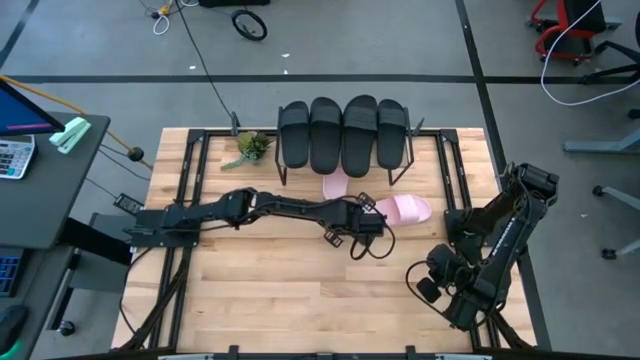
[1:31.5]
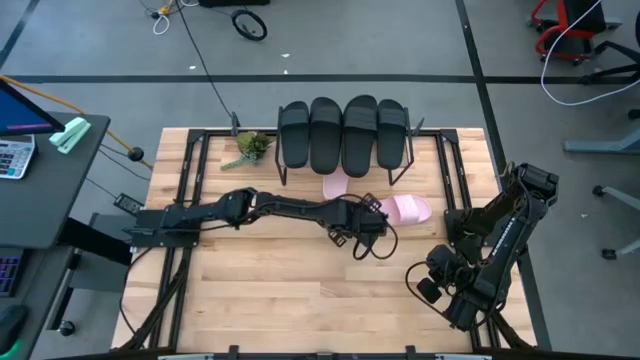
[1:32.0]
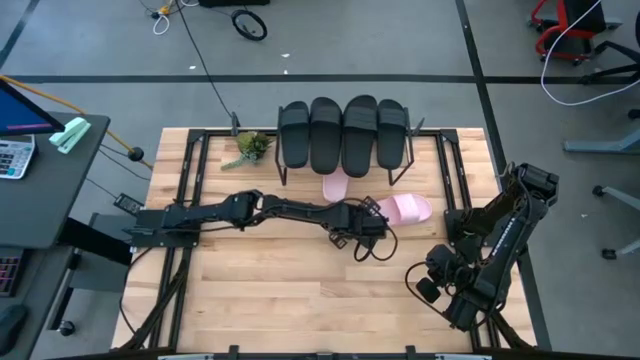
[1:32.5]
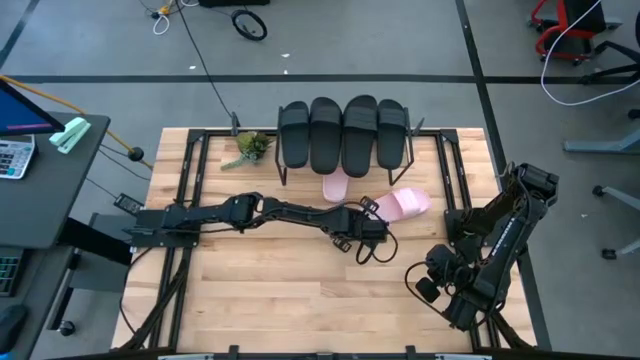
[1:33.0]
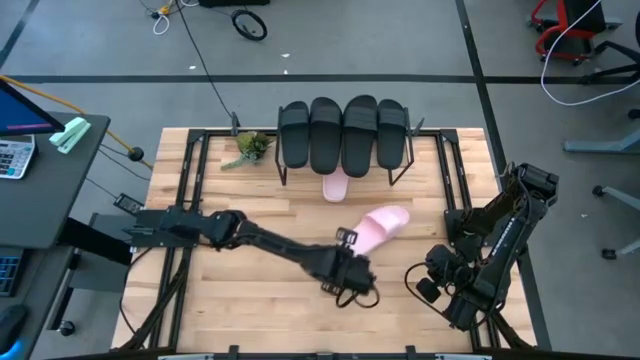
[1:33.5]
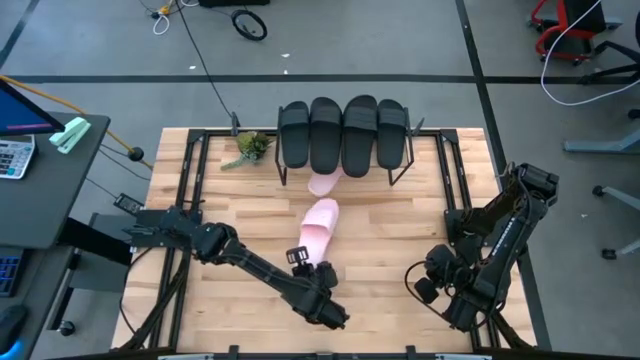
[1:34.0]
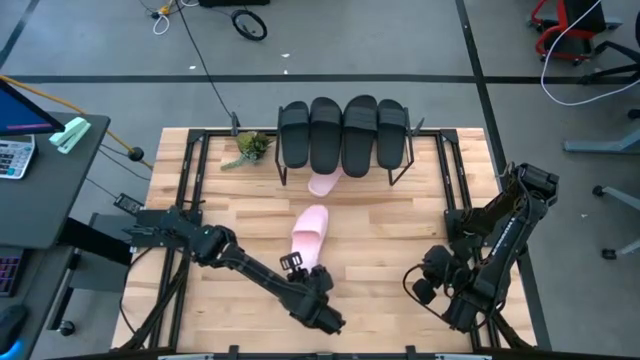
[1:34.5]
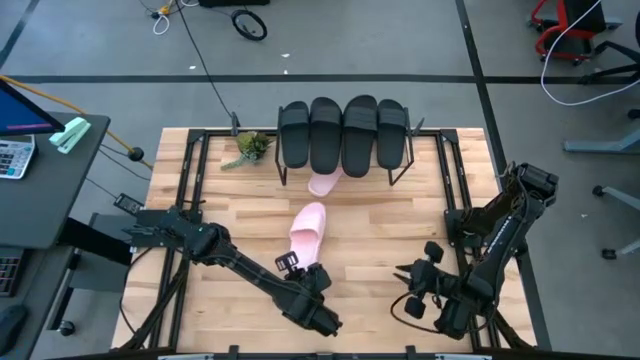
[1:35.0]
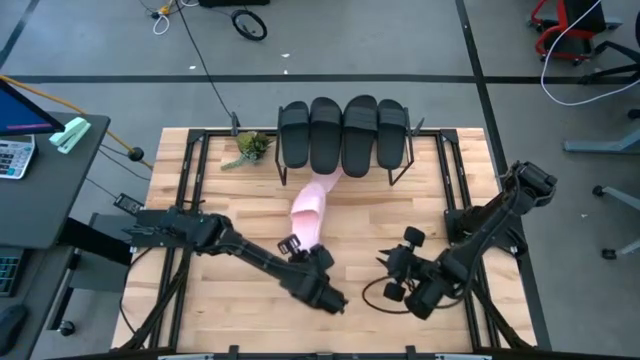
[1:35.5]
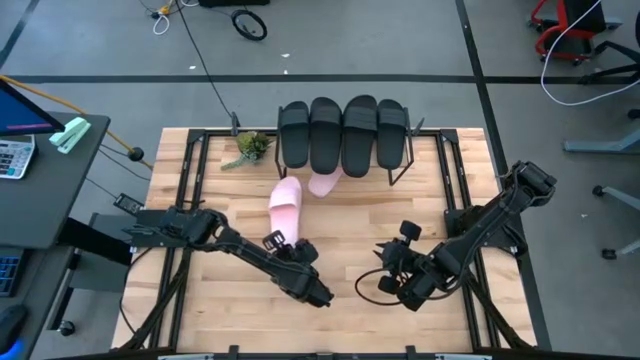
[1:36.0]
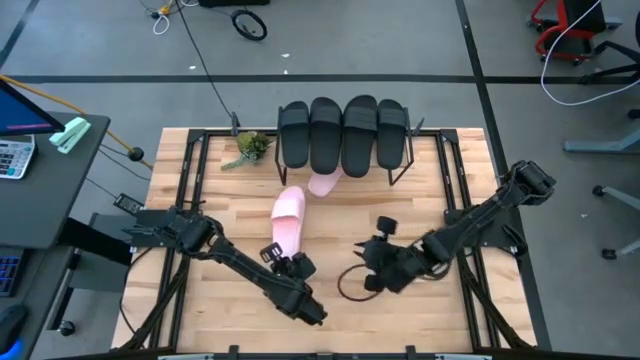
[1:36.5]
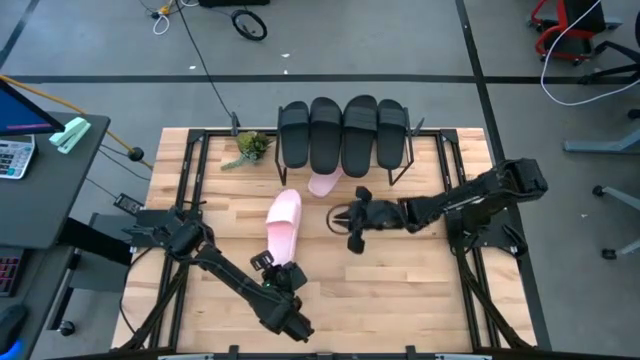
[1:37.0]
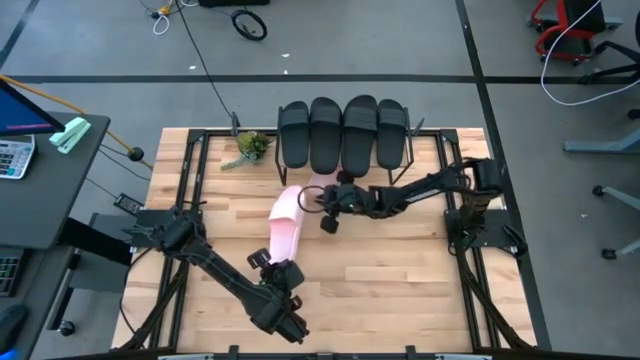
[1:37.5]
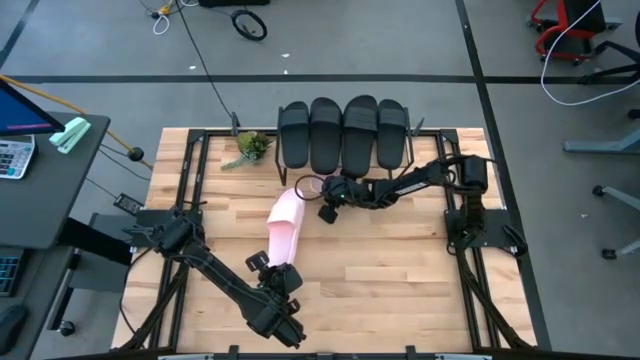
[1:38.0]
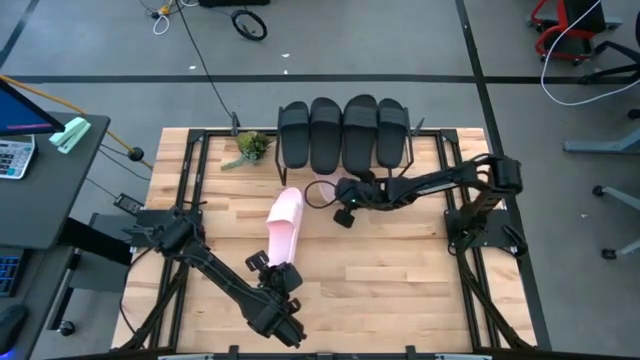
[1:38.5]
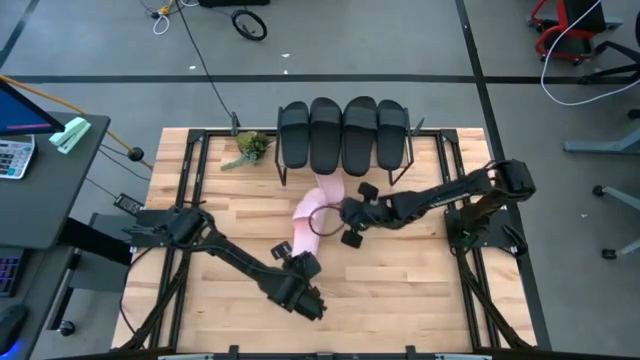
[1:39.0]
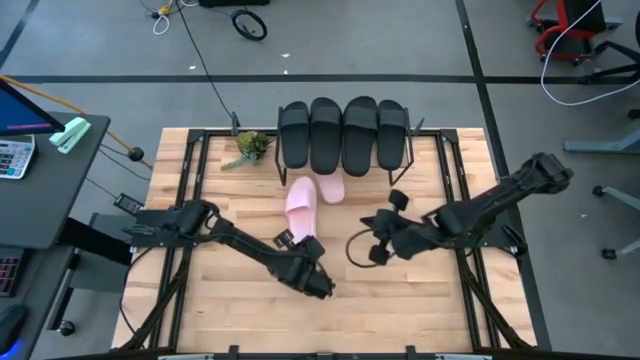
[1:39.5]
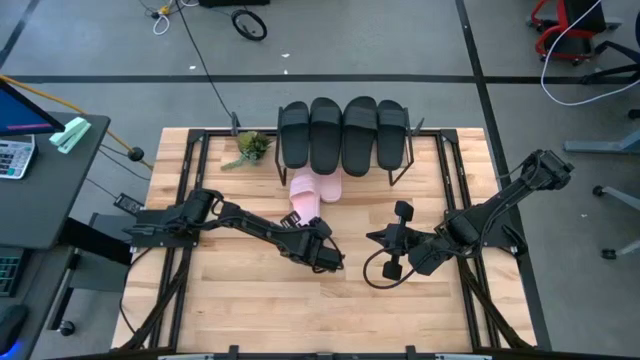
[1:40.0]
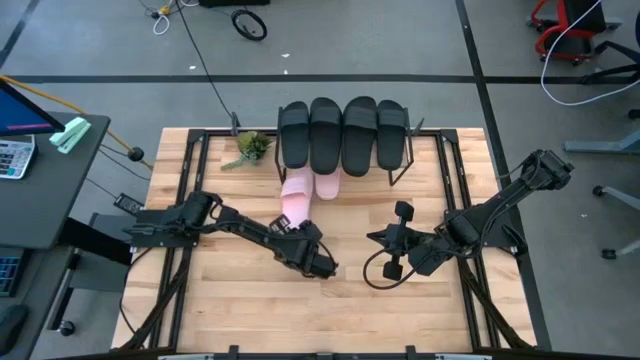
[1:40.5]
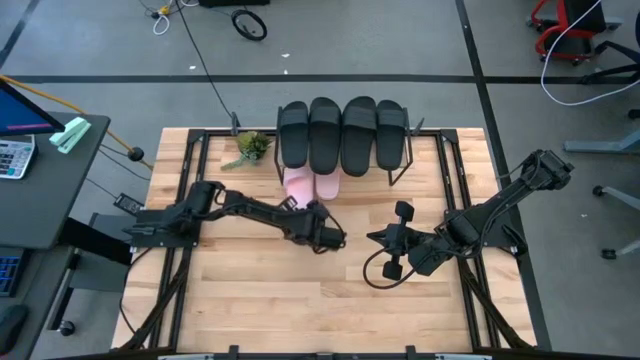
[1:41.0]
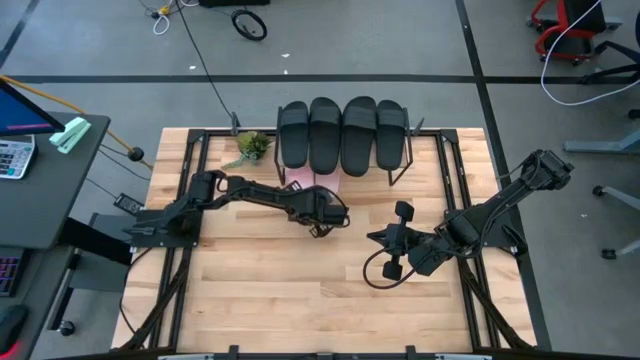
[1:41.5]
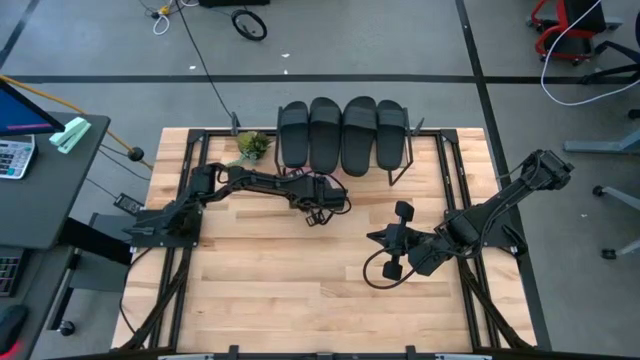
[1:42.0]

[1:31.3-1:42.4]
Task: Pick and place slides into the shelf
Put the pink slide under the shelf

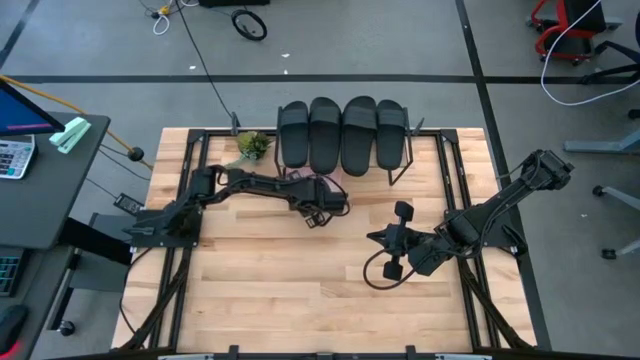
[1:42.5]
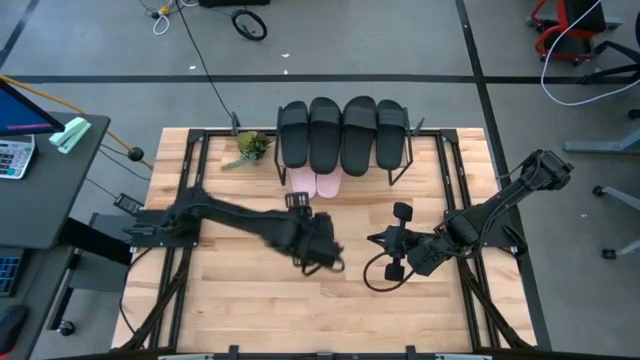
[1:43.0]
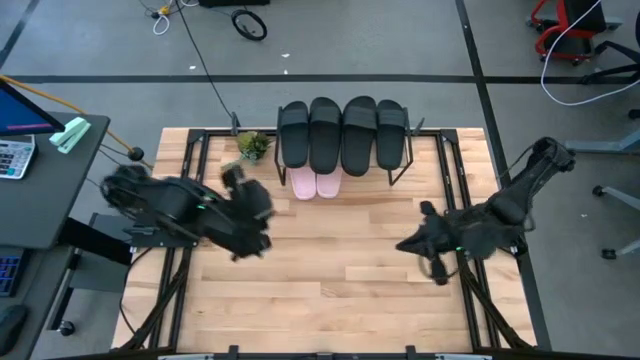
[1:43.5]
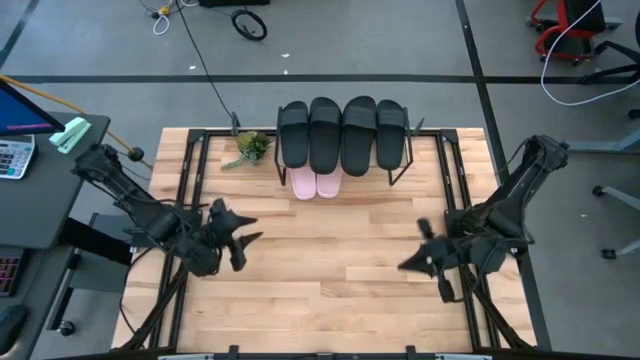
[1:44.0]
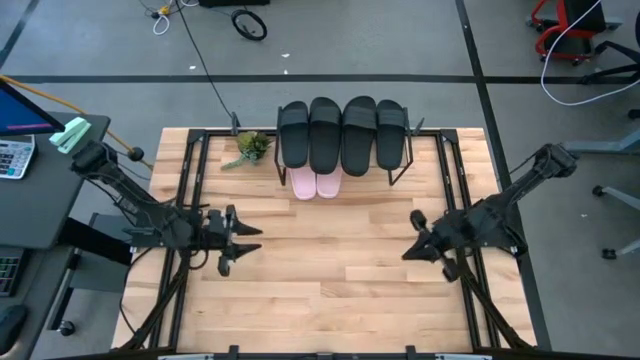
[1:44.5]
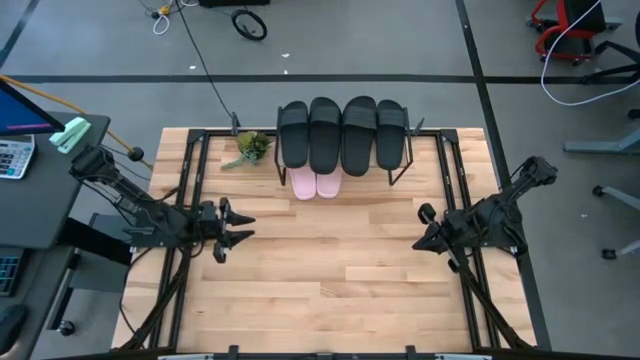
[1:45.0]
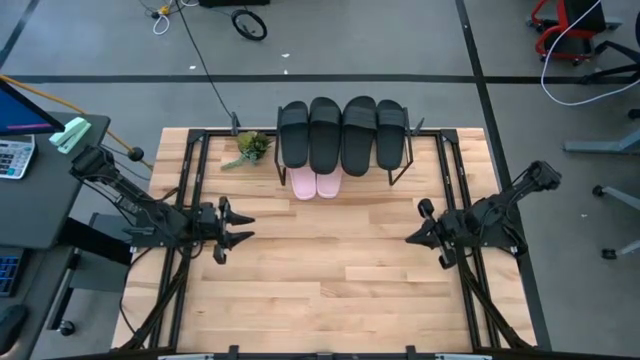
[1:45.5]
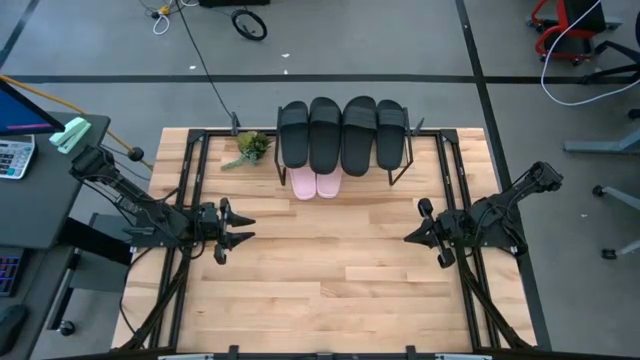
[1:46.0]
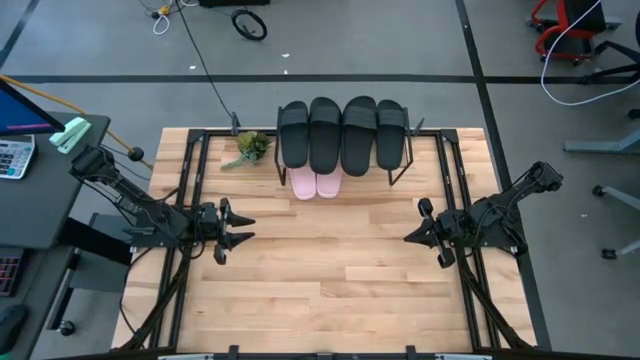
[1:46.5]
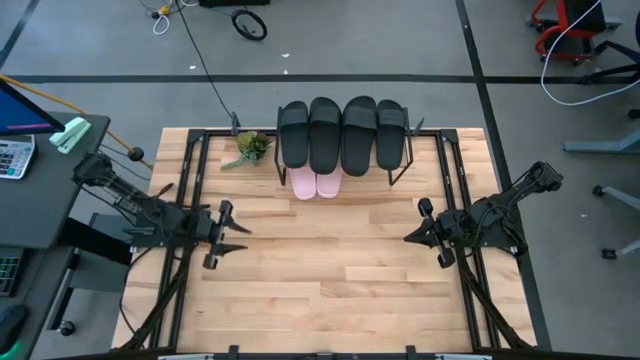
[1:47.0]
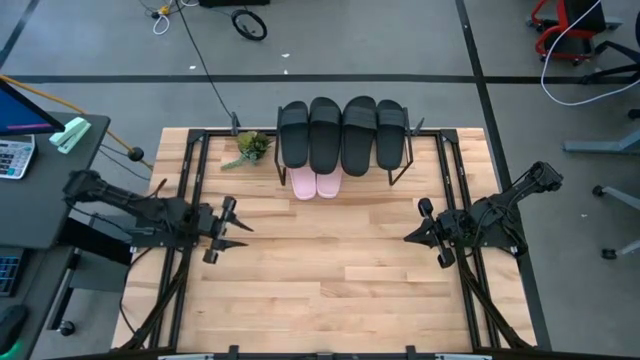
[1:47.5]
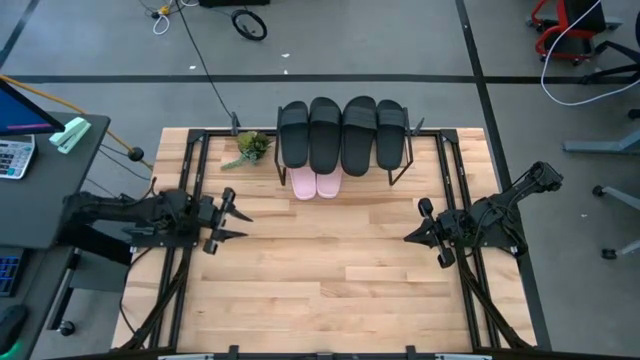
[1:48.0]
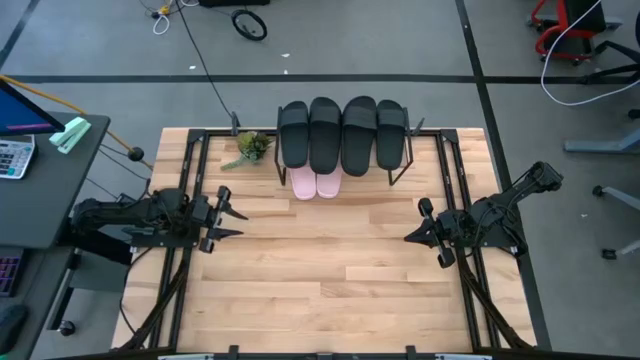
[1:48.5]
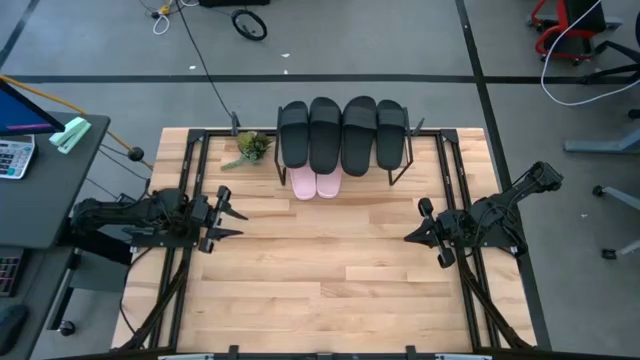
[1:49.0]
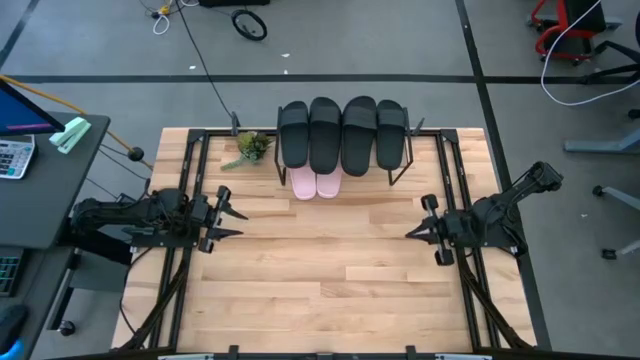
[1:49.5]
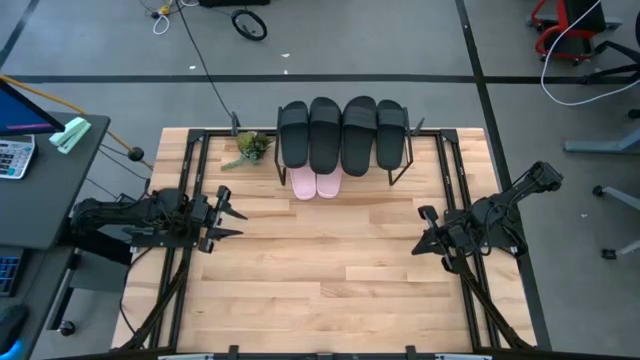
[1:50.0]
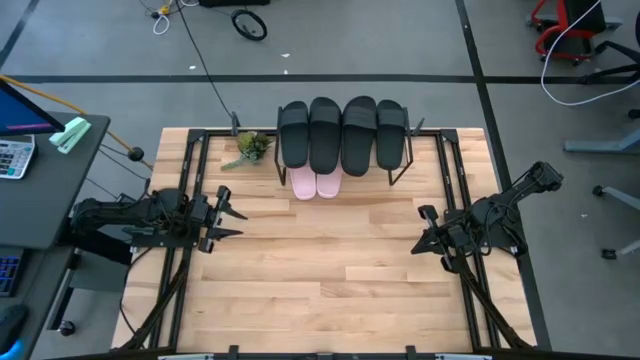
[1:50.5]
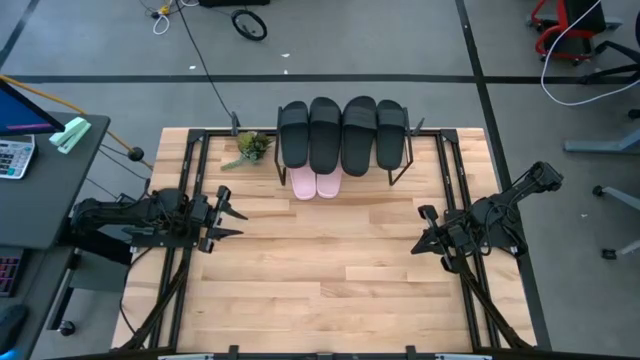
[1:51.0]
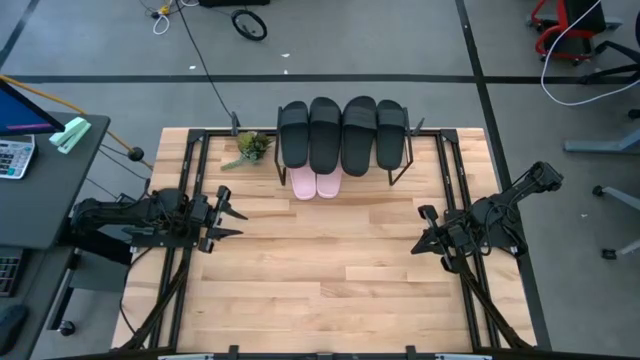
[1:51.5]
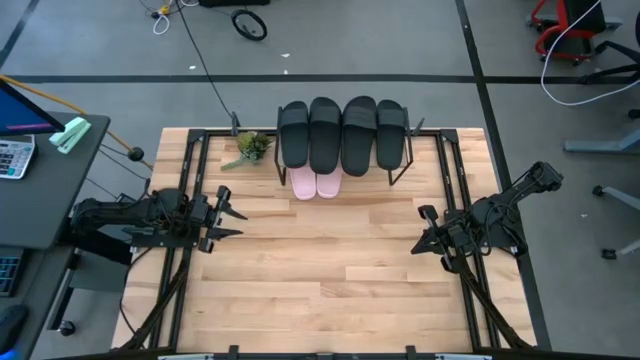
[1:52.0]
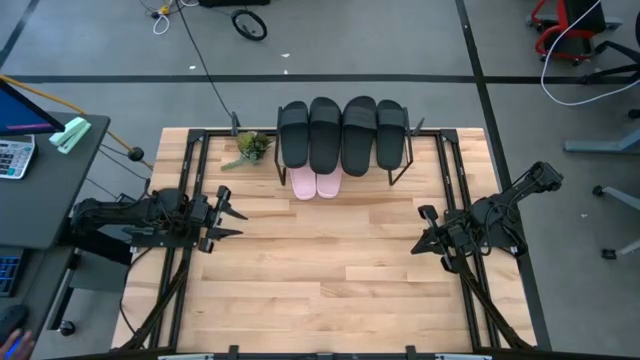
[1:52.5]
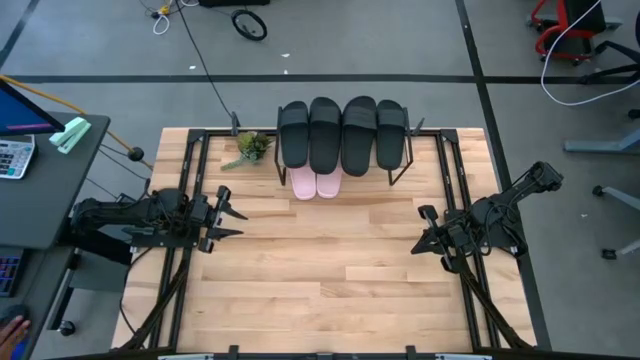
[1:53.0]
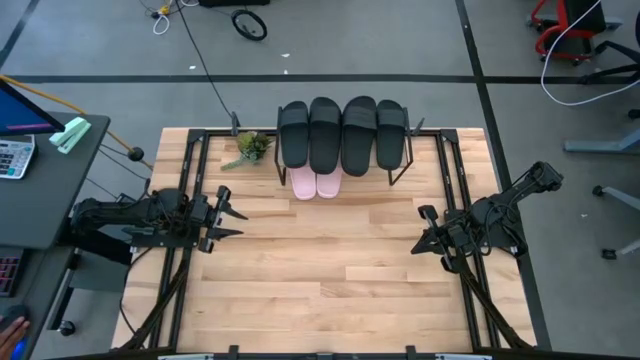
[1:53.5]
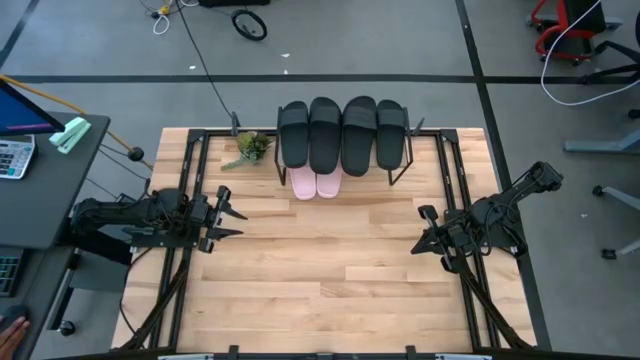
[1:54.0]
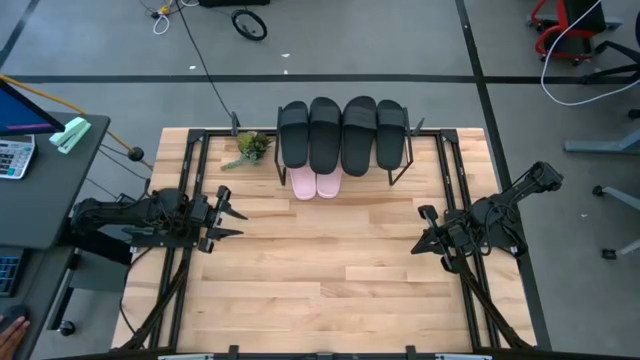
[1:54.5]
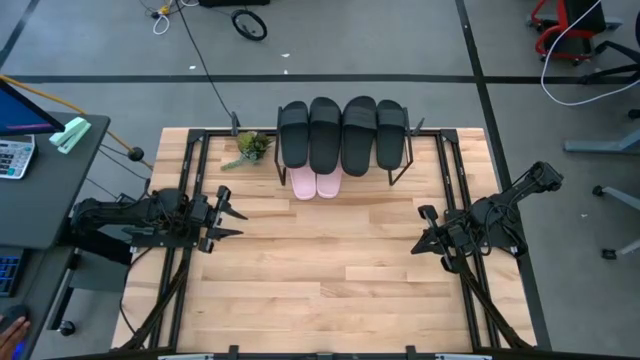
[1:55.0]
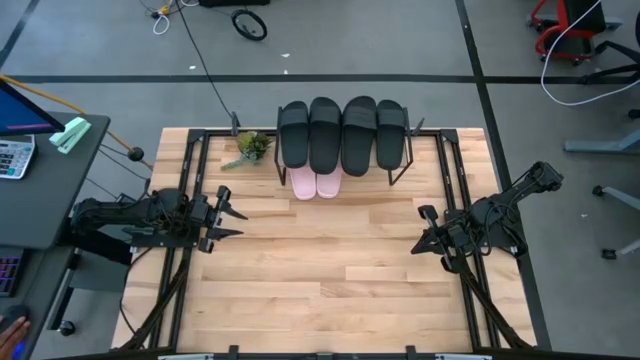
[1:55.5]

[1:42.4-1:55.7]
Return to Home Position
